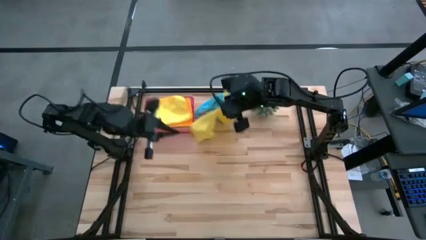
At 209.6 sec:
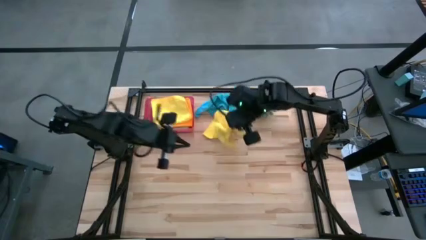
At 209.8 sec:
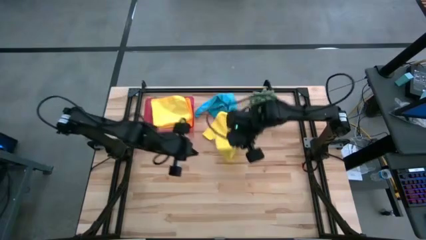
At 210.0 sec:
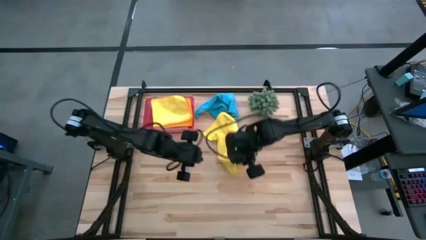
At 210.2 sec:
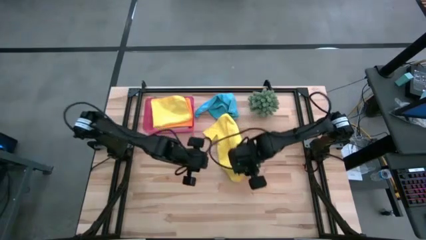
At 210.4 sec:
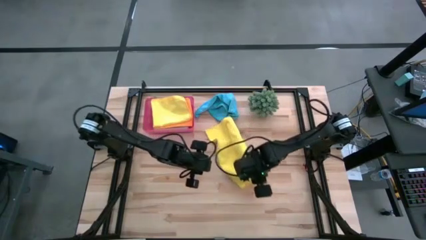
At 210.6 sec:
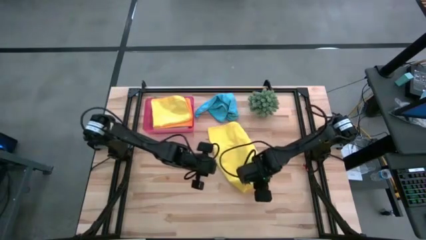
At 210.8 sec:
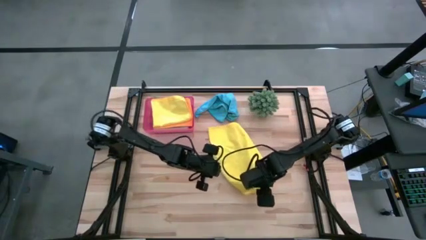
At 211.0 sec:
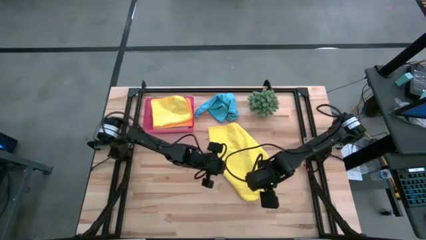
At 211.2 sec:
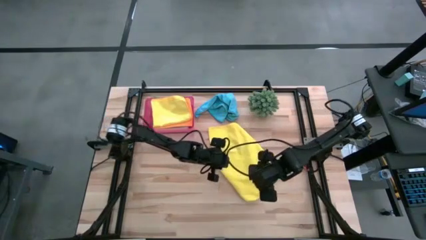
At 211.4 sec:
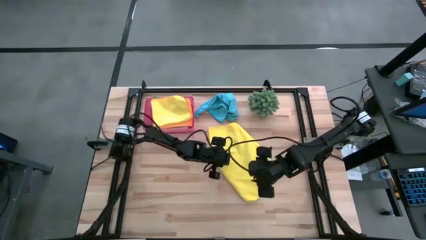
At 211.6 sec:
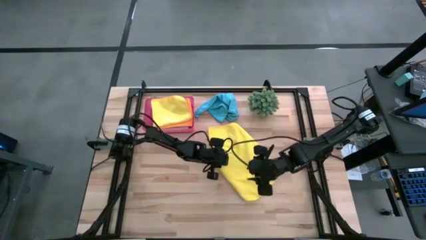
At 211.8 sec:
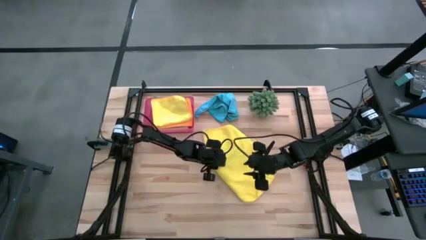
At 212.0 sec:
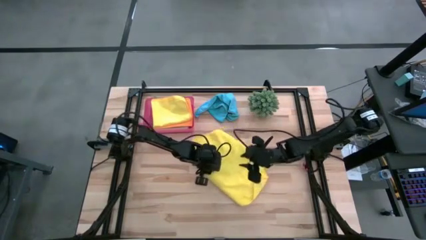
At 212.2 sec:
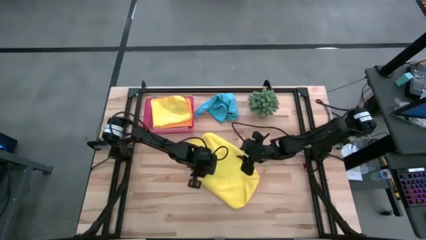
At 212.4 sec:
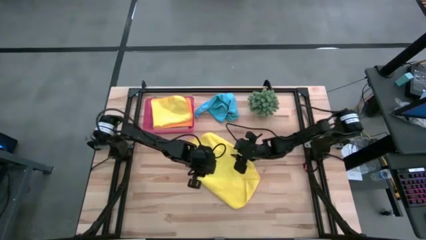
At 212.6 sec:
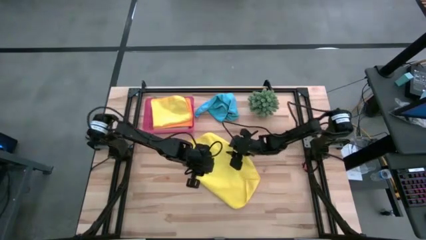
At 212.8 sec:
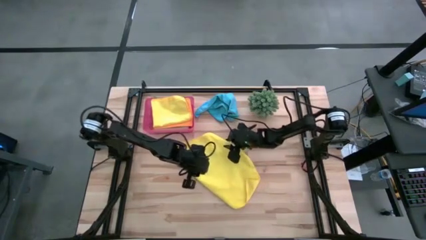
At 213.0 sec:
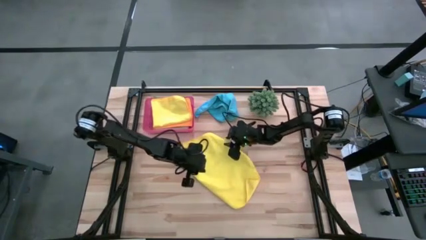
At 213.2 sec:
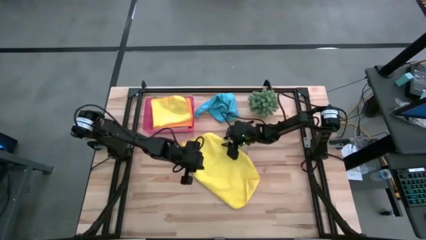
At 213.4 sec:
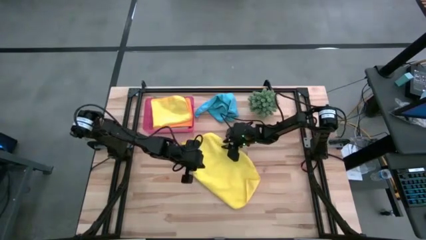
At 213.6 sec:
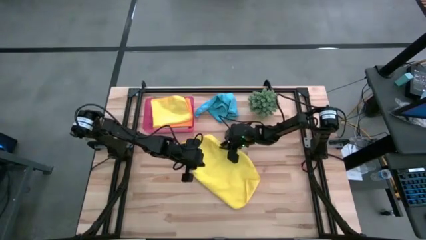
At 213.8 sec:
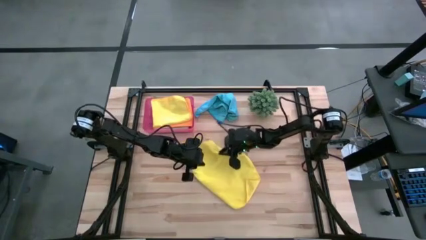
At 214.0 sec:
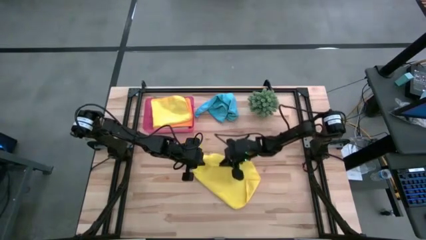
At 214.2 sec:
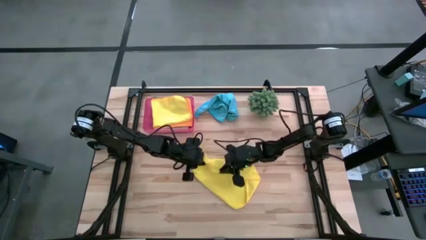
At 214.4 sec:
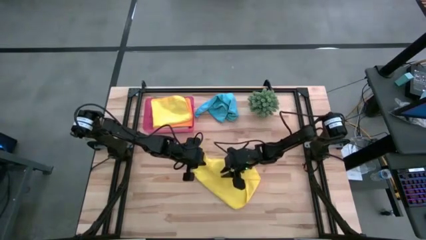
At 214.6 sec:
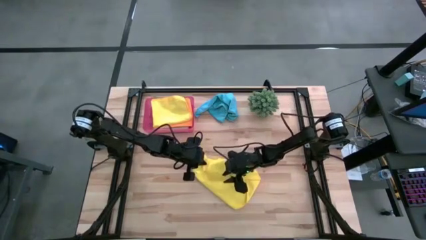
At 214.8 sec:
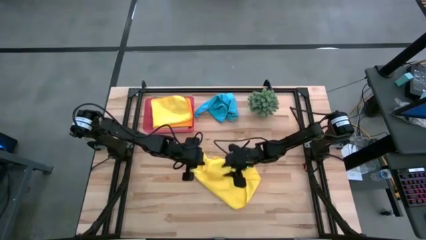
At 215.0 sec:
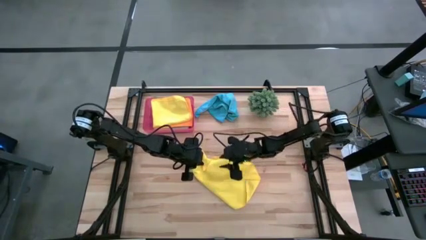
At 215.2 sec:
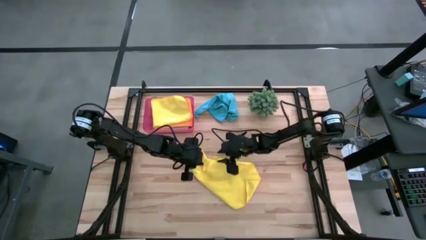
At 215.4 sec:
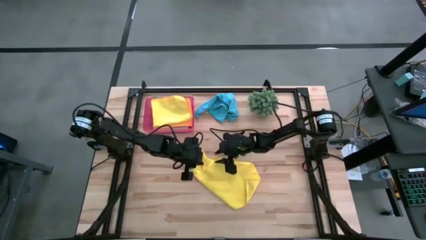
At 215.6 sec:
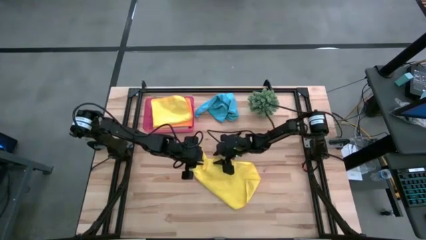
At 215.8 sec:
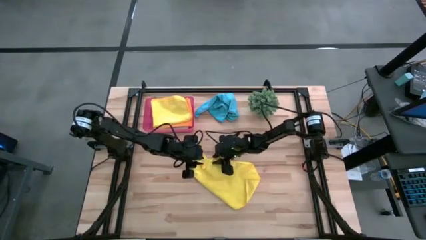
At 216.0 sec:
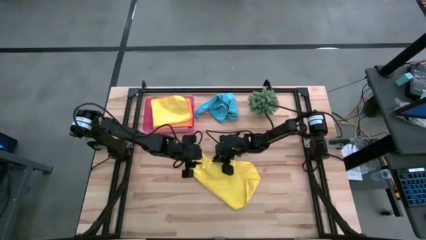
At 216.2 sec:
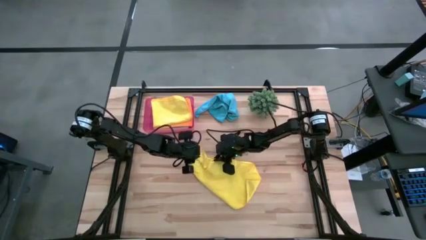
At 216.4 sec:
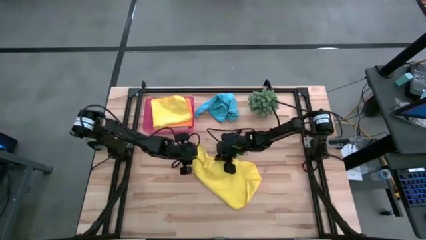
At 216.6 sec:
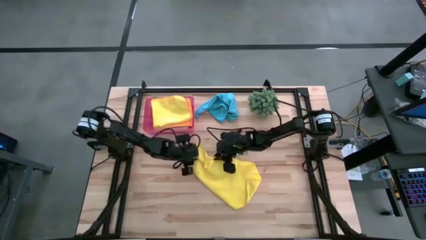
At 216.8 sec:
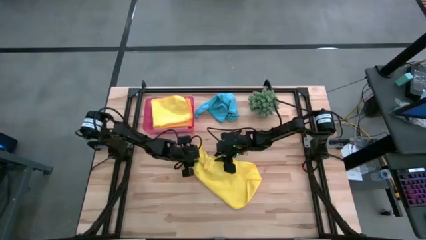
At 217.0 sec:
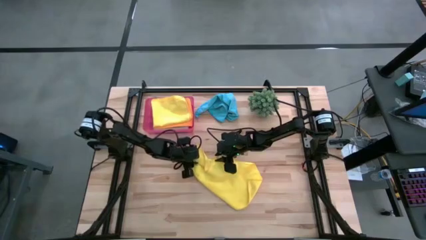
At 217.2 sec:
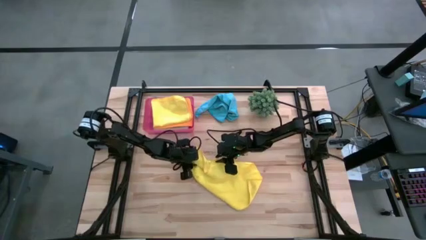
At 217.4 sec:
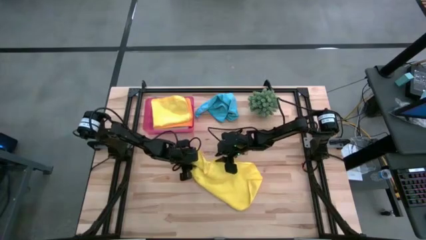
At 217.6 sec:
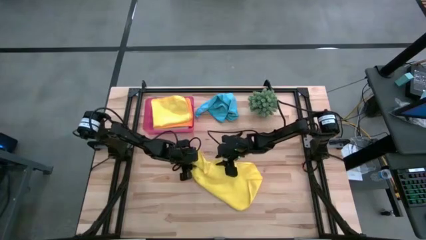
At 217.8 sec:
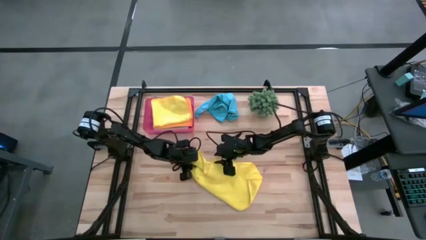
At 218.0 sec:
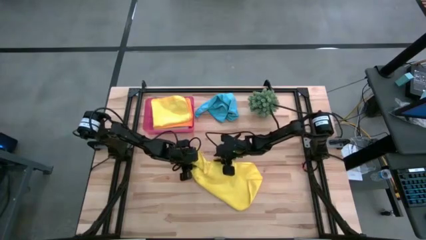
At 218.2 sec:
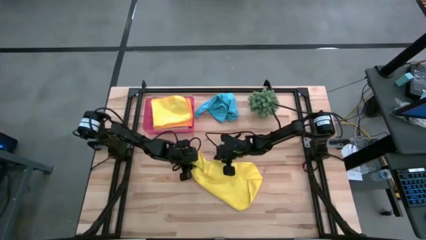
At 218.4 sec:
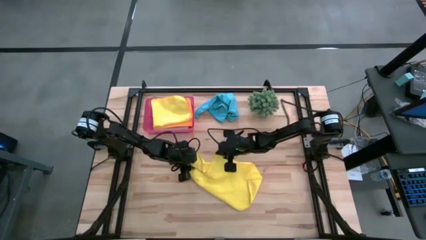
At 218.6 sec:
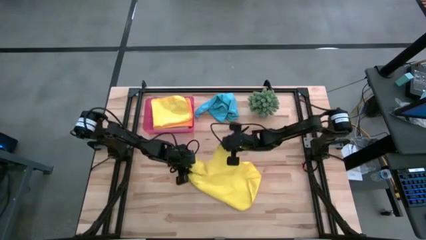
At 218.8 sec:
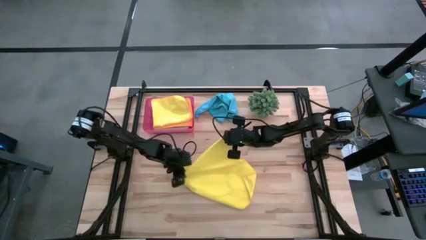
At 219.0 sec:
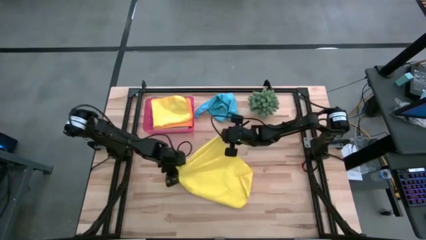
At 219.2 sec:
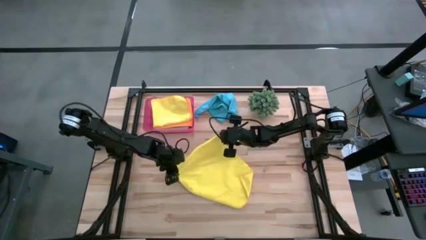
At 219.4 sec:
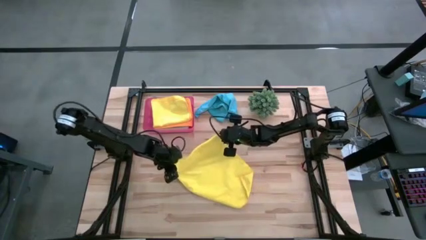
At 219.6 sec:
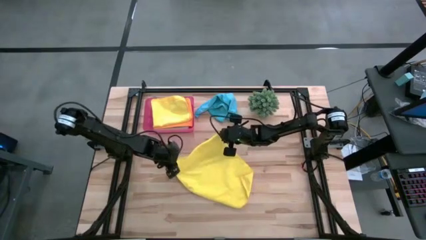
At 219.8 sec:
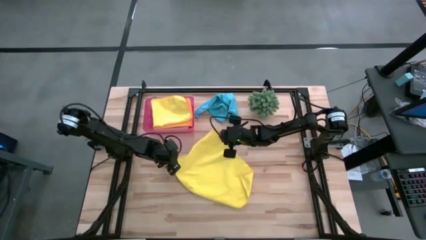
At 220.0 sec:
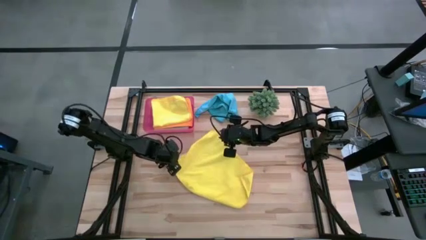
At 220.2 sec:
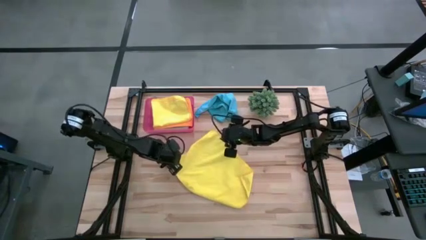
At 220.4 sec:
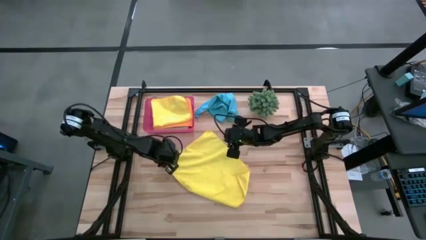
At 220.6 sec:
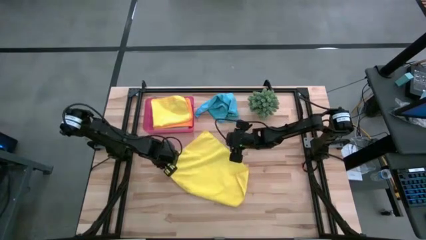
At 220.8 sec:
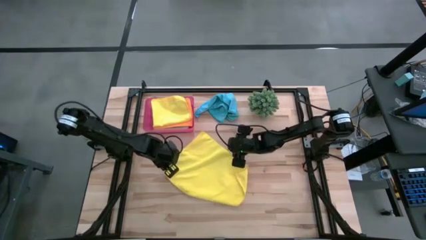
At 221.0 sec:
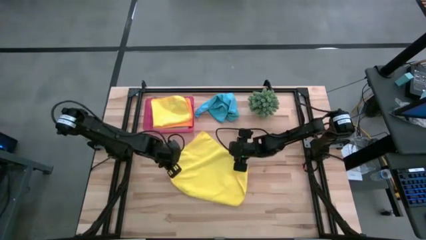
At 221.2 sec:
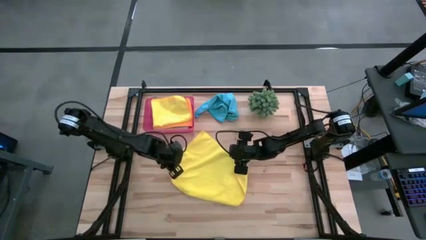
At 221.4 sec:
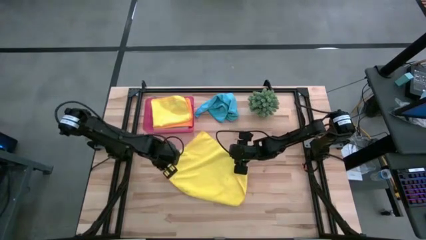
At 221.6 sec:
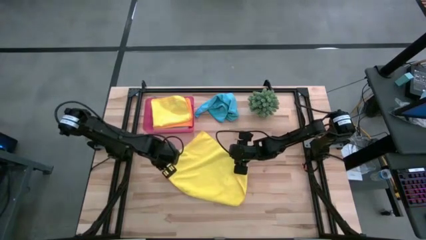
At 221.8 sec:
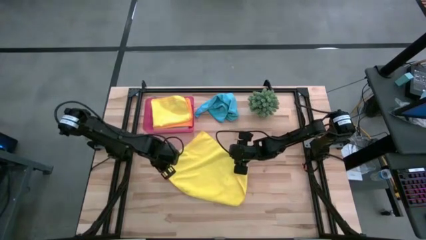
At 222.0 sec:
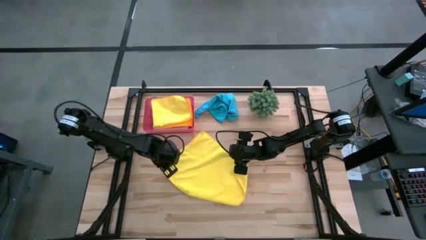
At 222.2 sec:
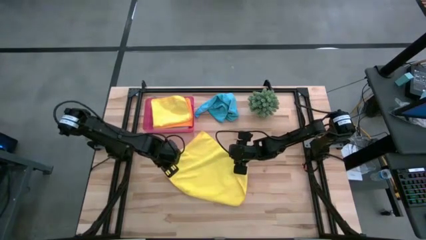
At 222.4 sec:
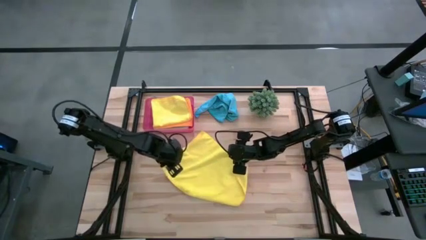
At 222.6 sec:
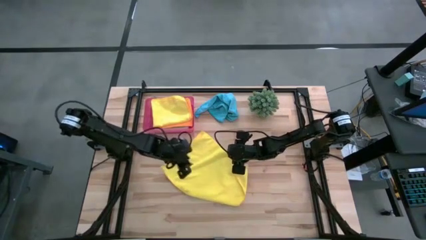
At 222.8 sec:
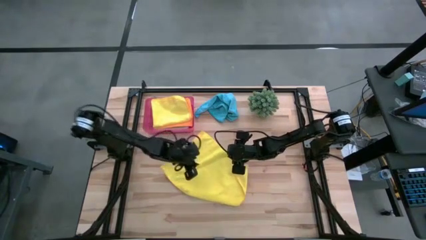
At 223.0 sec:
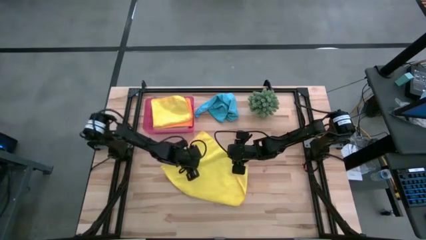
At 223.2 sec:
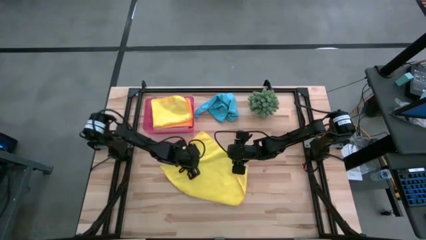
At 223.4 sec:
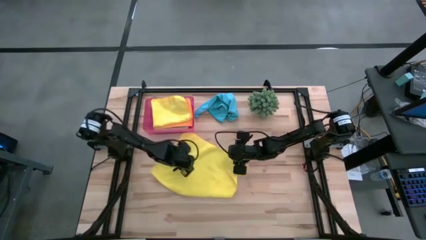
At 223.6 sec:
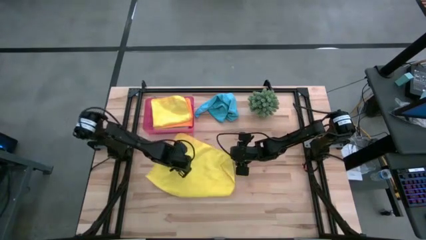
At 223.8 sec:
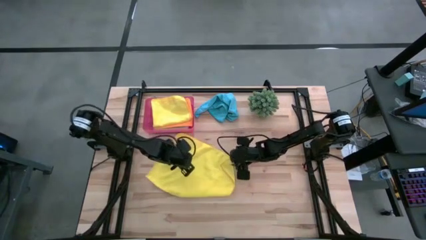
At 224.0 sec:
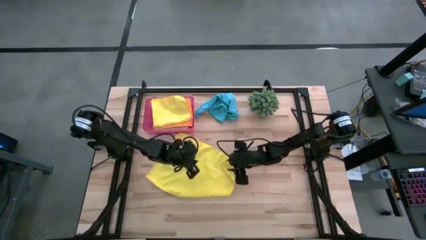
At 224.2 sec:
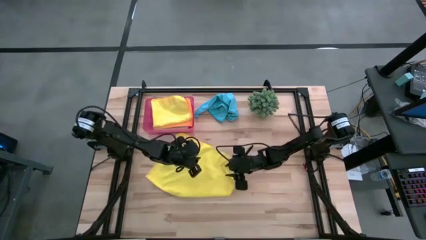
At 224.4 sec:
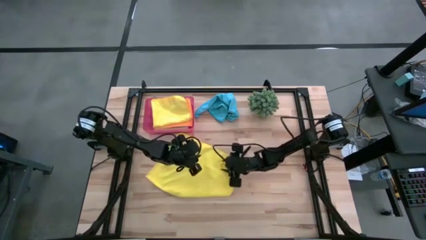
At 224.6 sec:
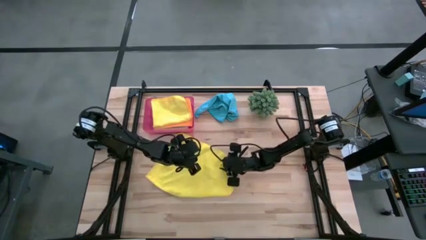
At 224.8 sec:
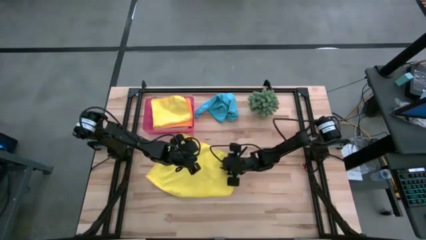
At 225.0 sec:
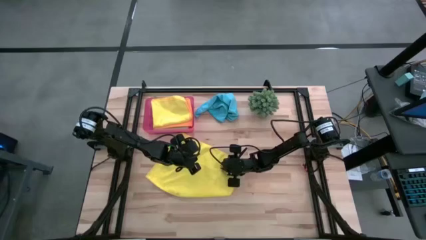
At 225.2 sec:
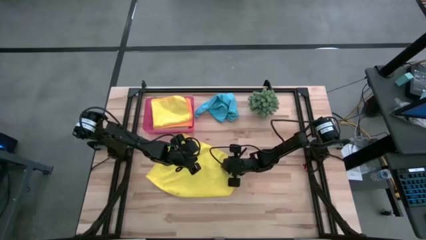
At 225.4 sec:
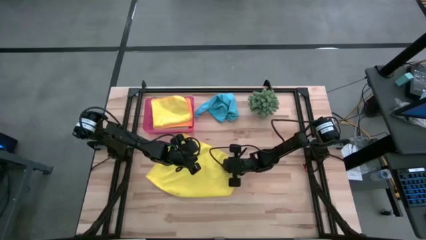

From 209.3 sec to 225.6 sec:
Task: Fold microfiber towels
Fold the yellow towel
